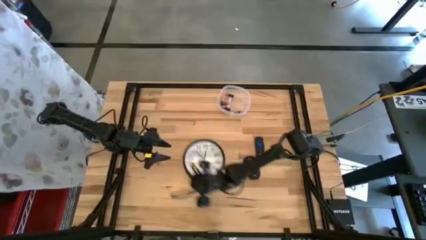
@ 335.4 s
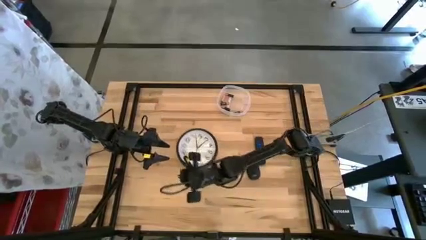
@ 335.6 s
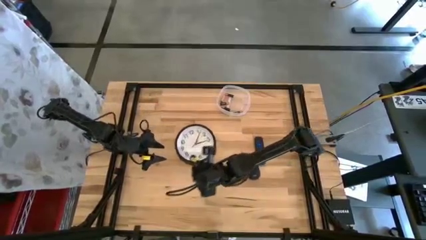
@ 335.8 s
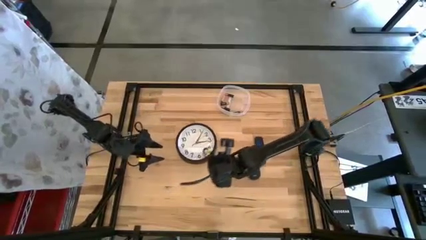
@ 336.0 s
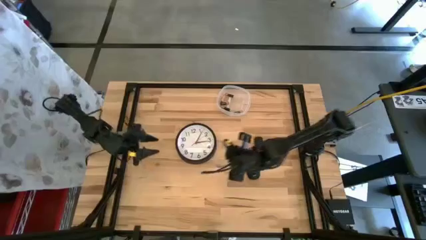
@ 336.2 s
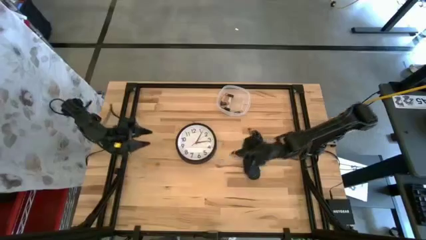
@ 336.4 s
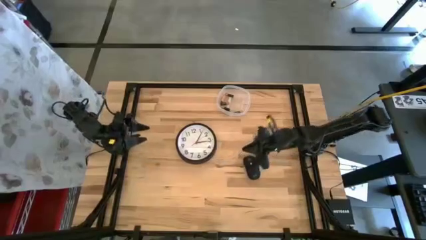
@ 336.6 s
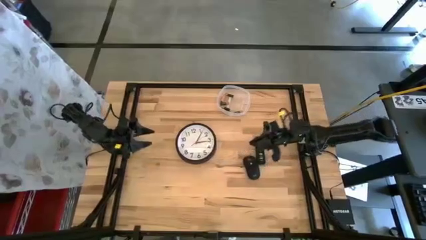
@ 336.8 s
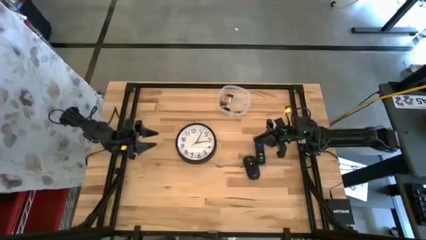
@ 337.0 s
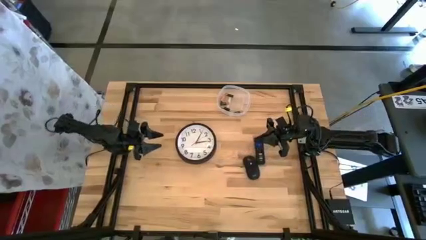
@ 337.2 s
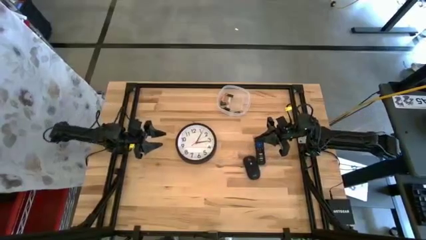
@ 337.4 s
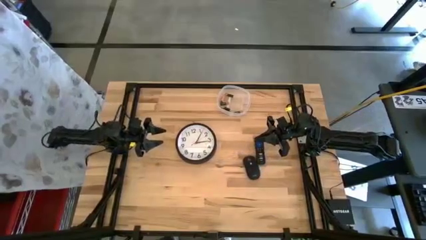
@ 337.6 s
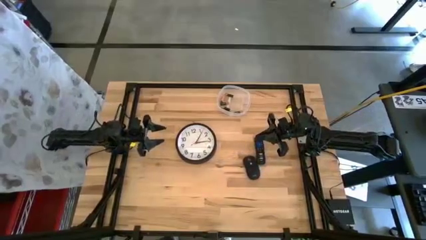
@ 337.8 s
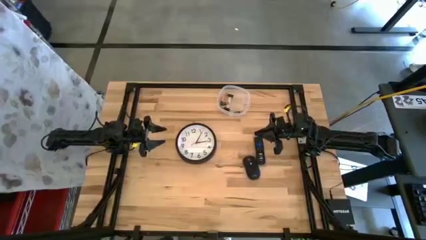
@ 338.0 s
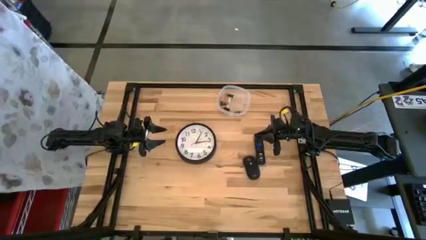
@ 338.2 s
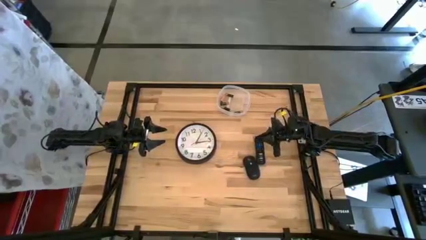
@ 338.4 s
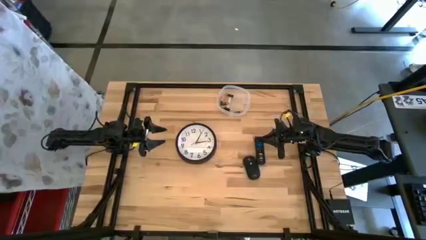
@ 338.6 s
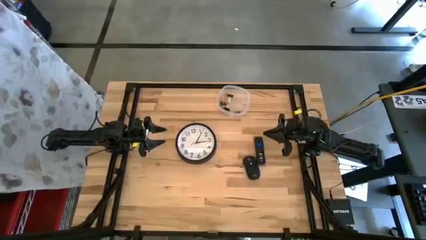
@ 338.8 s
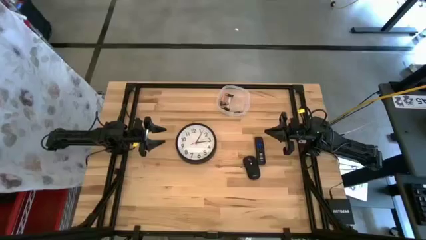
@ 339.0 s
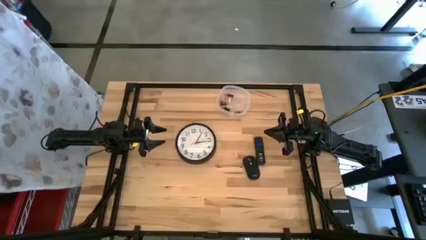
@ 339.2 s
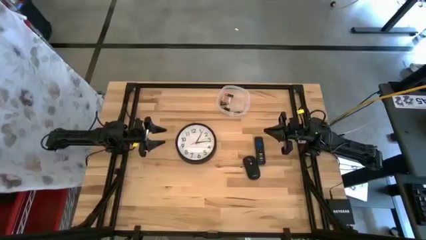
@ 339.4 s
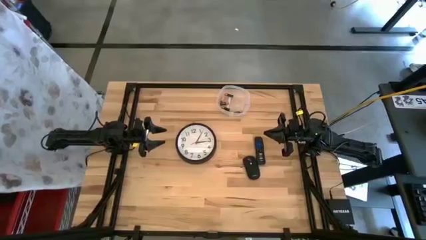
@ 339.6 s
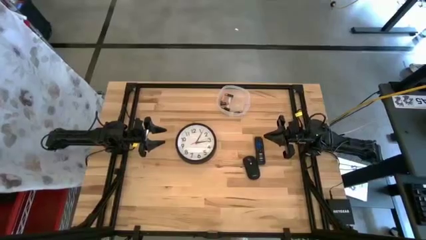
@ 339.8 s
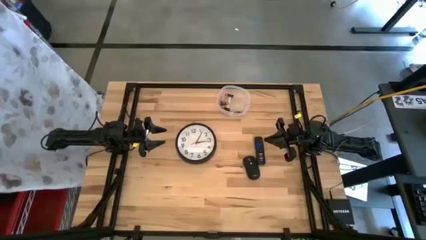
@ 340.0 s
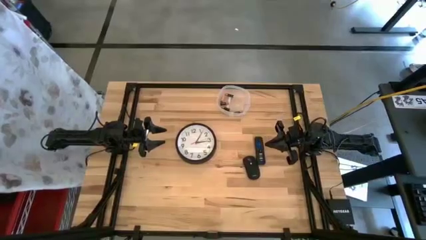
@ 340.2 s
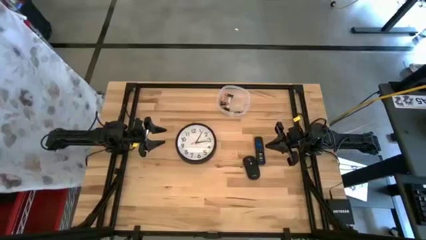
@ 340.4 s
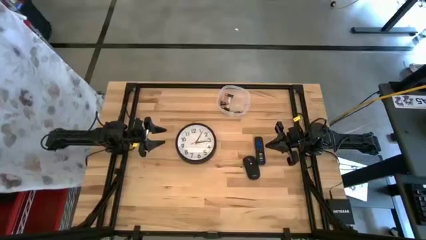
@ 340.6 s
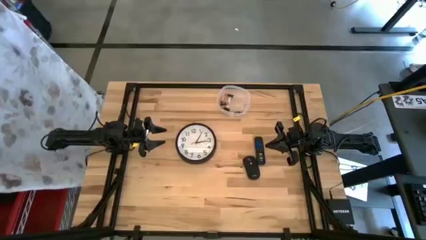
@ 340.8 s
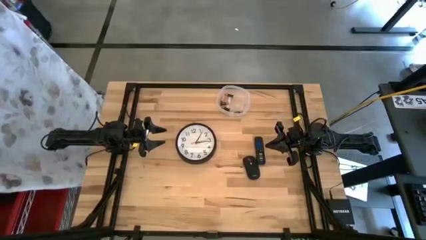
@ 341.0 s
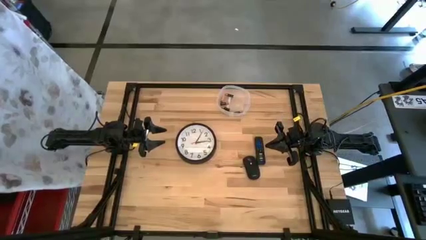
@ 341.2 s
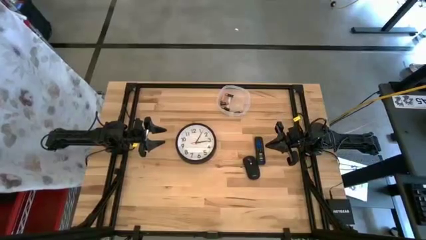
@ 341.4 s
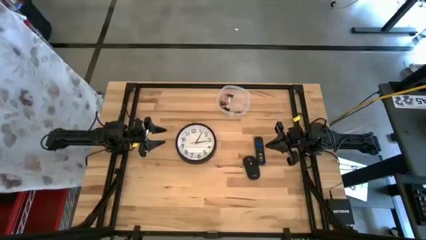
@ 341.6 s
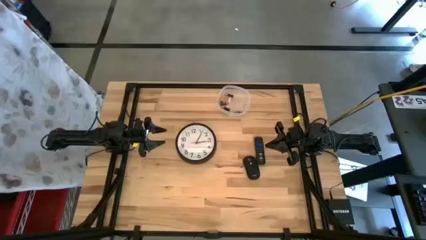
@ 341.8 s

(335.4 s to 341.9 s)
Task: Insert battery
Return to Home Position

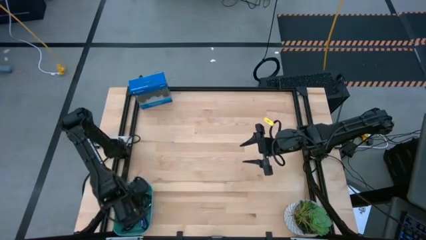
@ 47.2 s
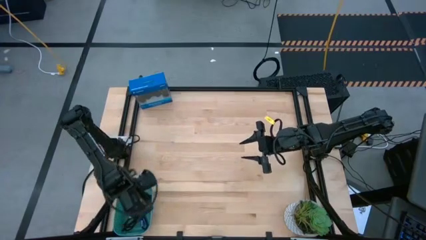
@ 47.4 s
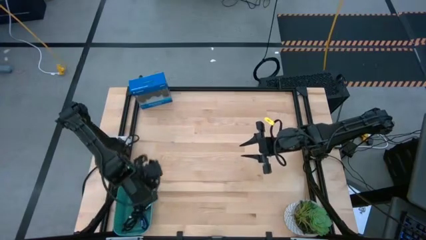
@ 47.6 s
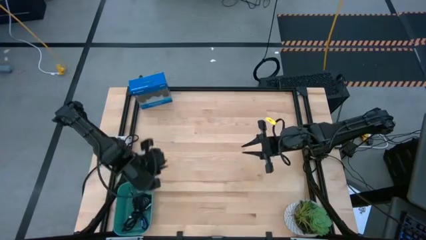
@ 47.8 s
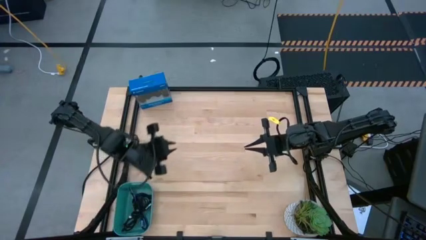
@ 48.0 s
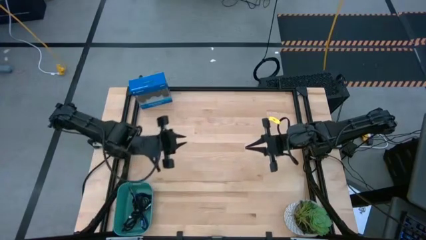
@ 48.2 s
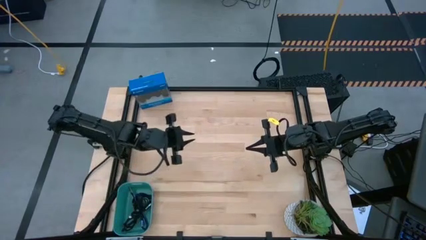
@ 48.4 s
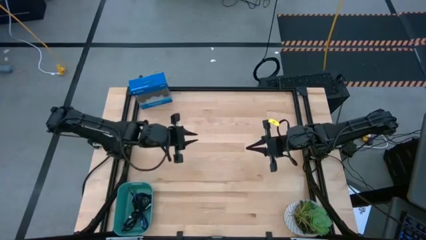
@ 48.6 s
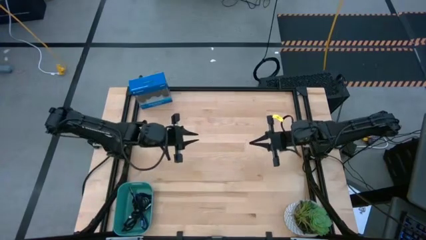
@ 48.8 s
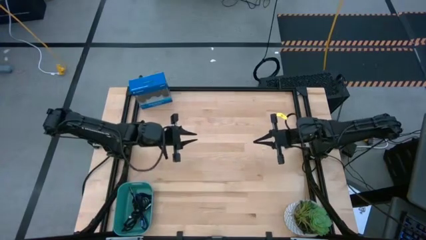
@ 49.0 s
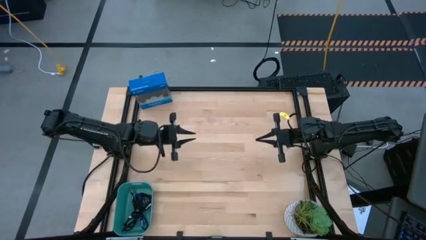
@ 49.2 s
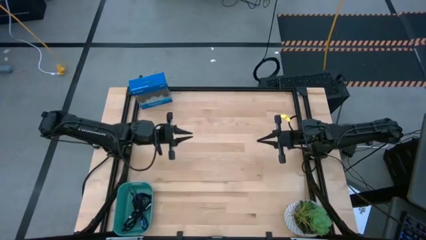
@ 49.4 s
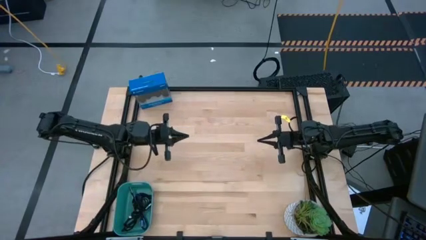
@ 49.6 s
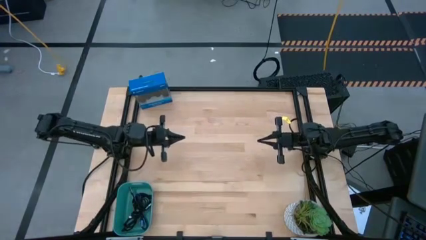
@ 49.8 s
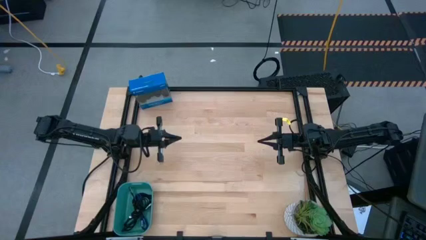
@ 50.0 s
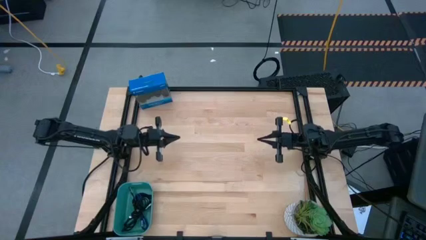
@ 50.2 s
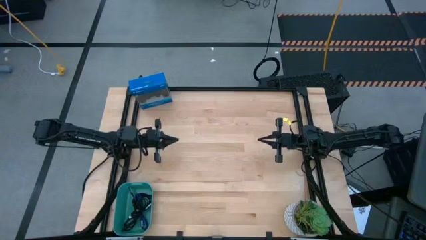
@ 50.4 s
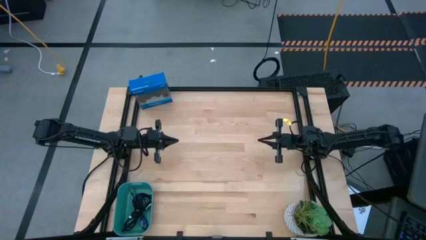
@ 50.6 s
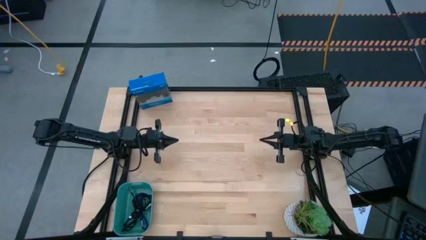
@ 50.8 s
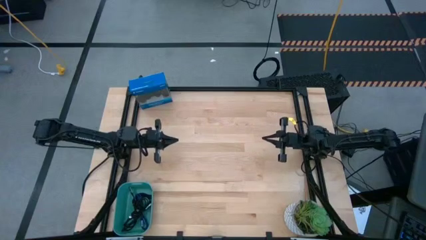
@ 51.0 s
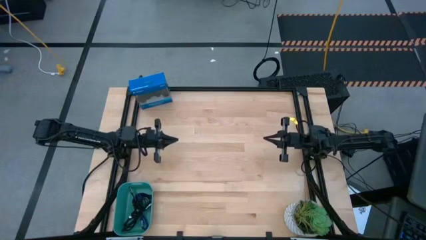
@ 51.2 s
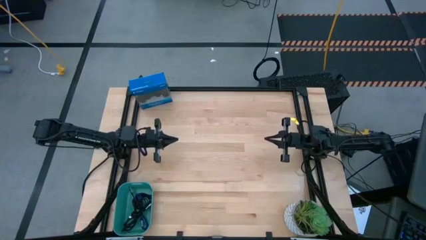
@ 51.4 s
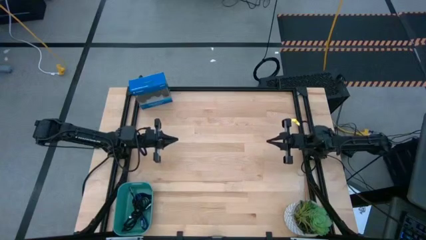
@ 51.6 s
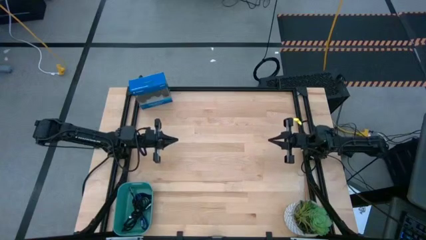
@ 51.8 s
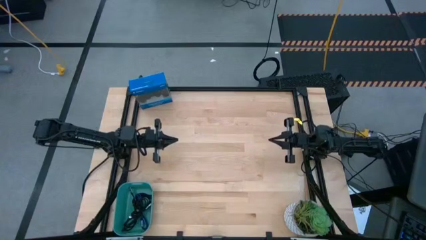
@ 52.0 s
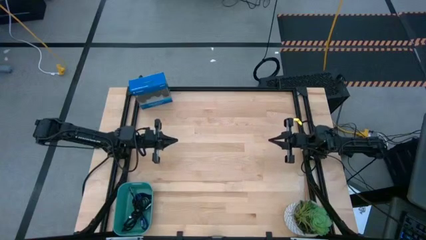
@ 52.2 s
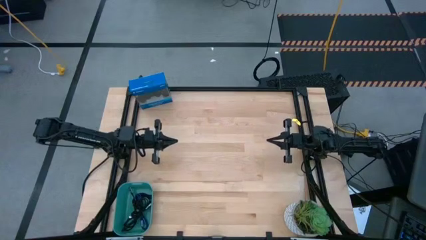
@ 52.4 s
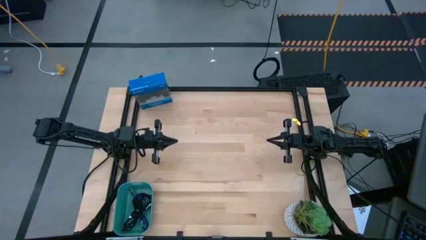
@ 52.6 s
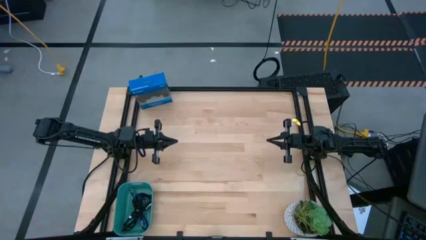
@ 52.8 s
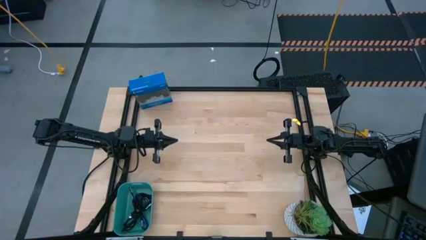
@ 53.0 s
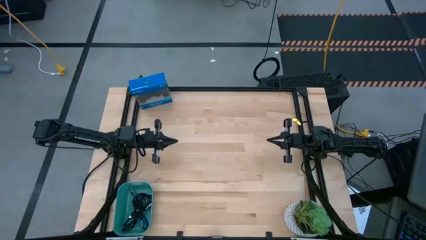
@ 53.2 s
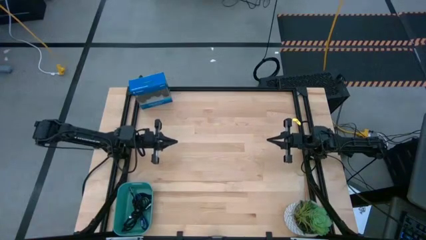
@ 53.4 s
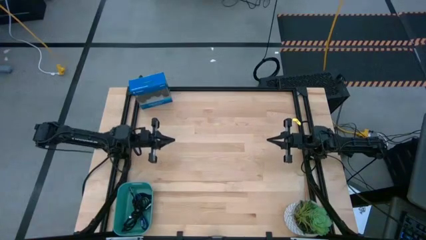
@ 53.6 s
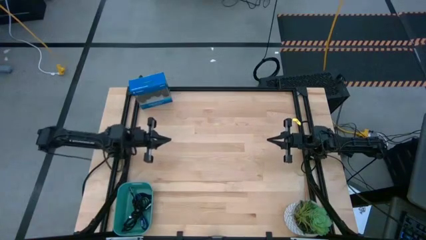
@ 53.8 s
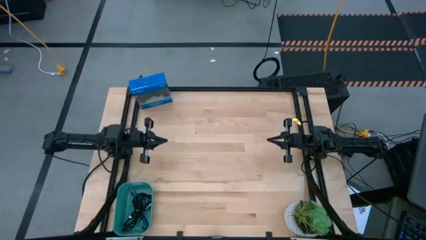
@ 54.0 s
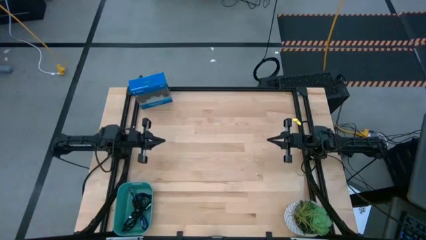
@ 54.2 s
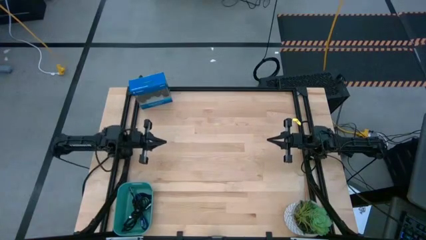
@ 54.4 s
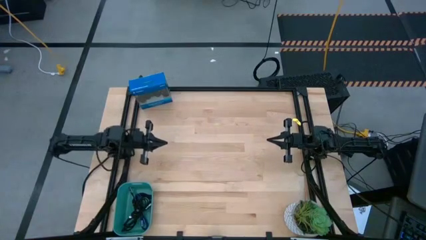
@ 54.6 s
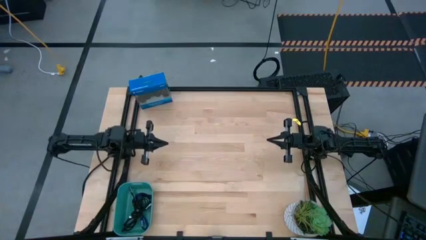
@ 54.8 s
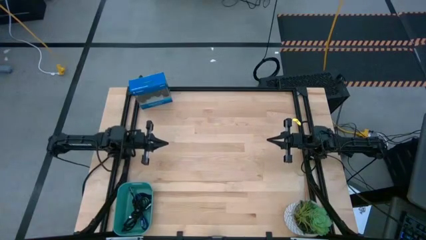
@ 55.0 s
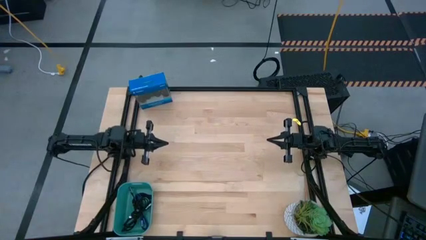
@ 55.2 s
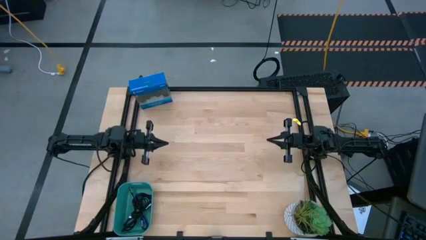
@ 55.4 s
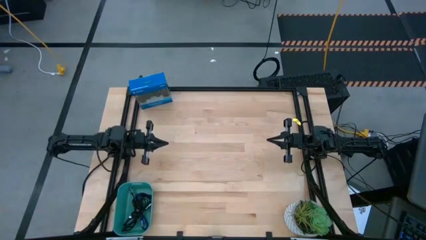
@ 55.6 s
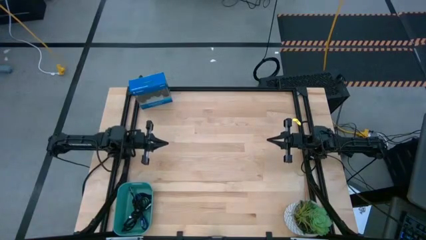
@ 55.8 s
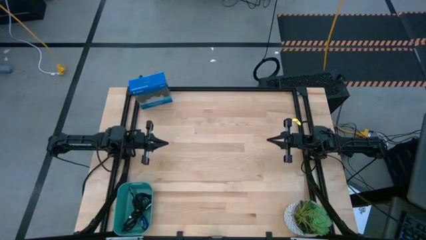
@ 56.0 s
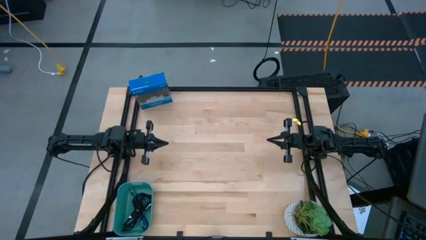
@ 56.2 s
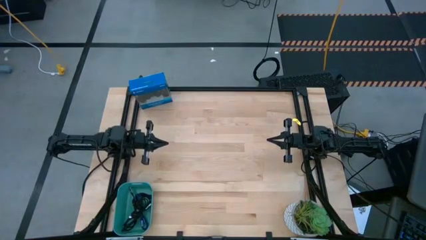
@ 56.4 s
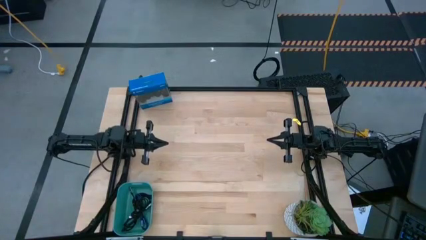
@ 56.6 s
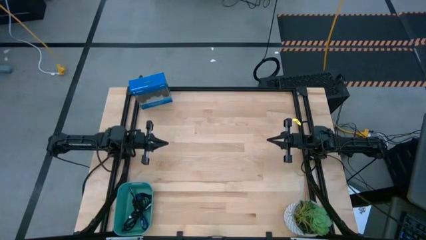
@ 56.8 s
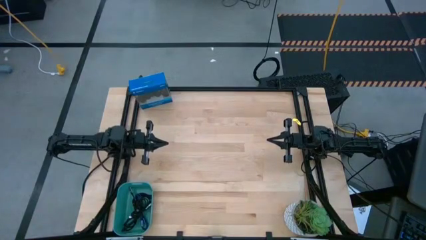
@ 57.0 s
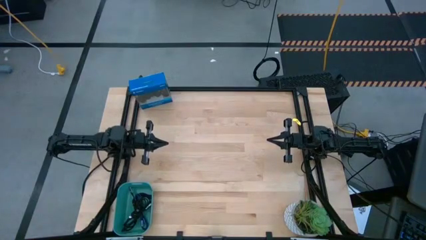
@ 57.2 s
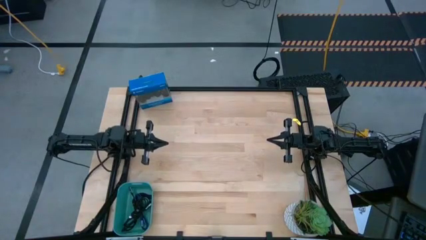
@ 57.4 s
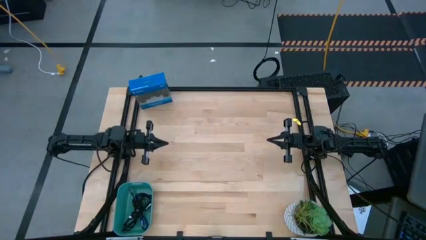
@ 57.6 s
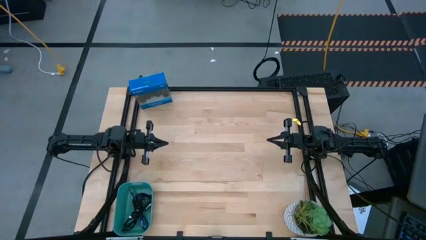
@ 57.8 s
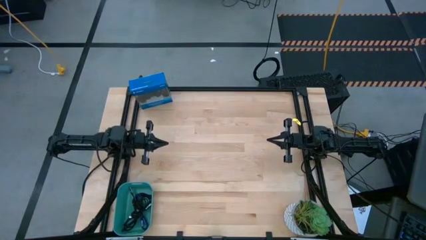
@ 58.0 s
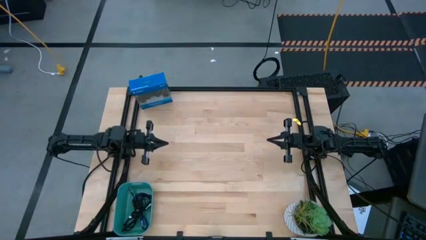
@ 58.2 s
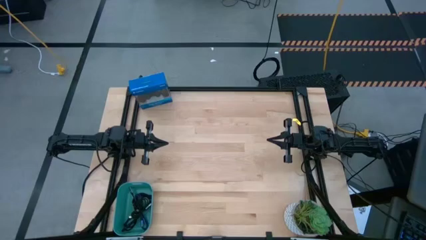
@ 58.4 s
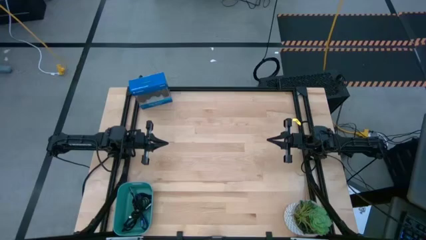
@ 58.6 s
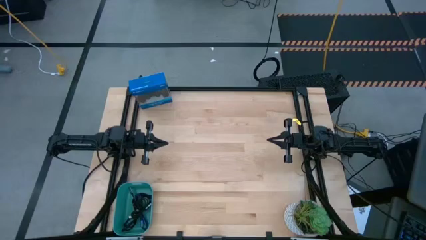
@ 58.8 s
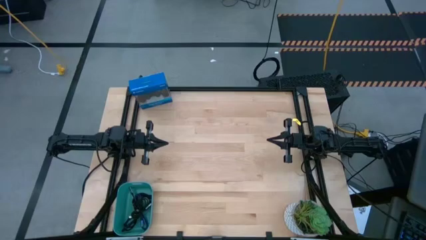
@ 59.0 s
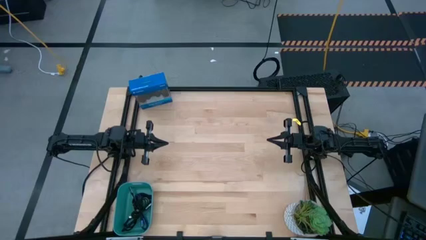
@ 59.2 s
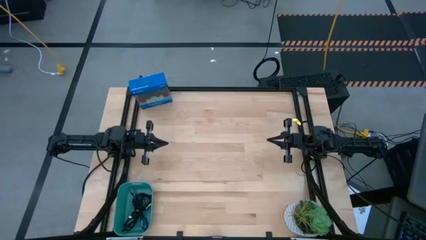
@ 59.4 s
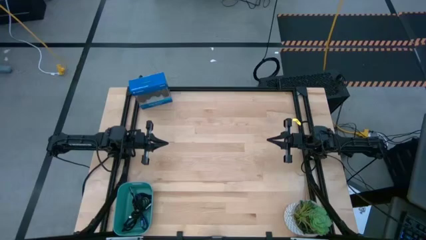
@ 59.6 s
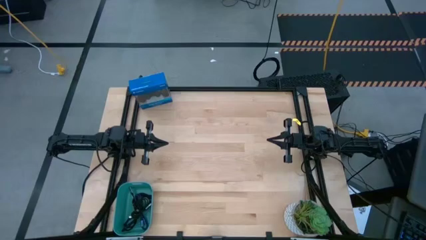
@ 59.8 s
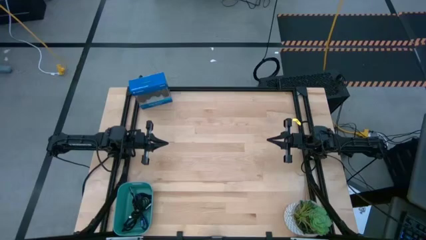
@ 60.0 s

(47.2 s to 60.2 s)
Task: Pick and place USB-C Cables
Return to home position
